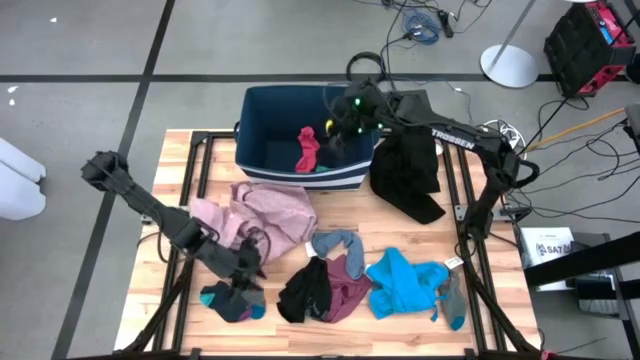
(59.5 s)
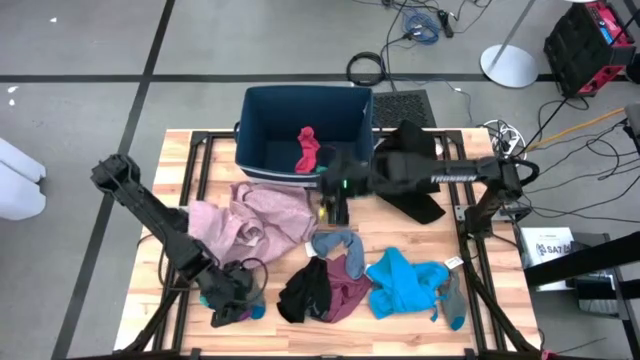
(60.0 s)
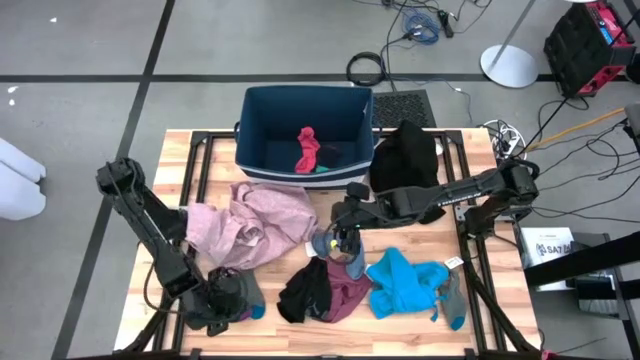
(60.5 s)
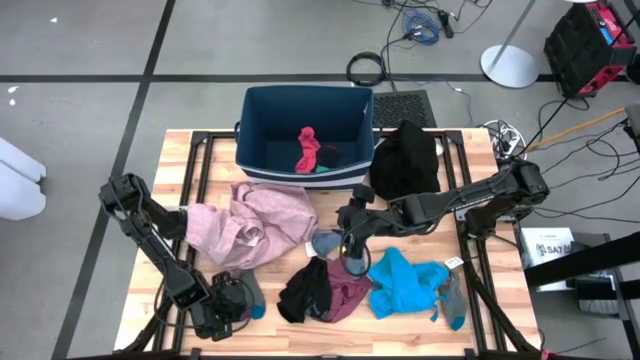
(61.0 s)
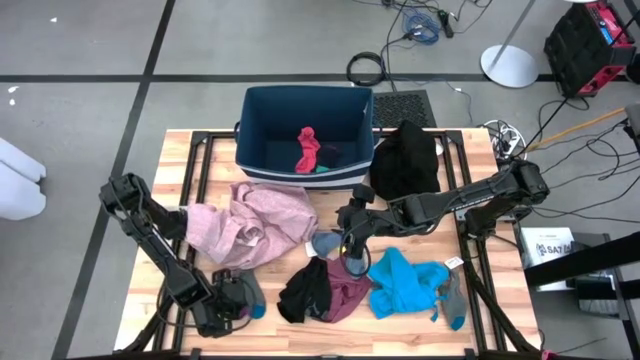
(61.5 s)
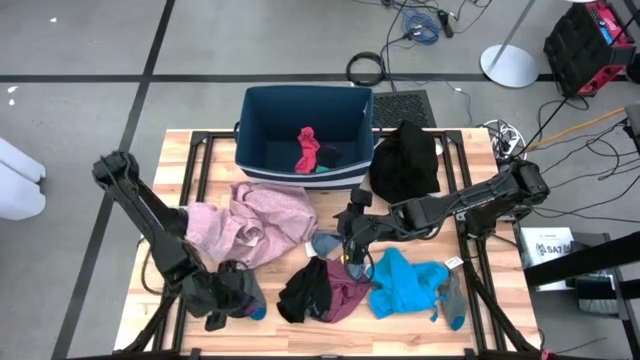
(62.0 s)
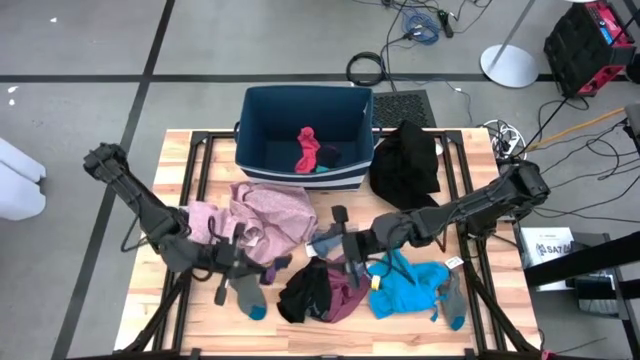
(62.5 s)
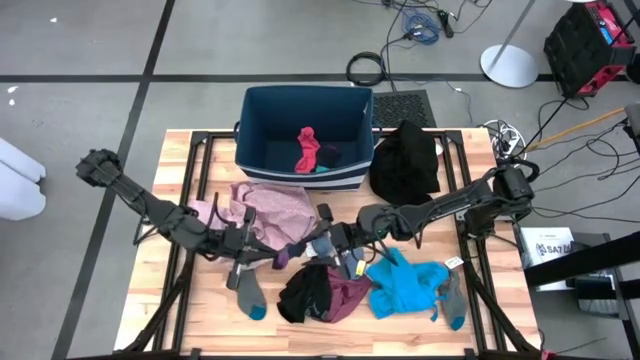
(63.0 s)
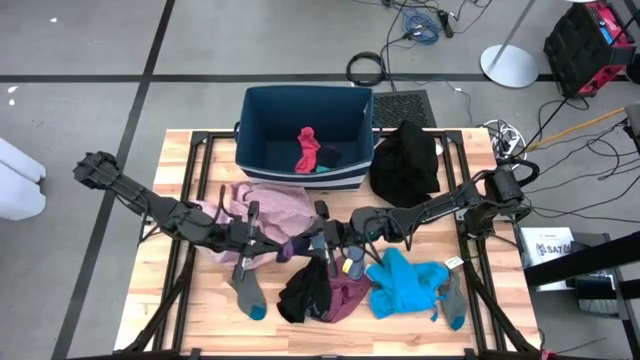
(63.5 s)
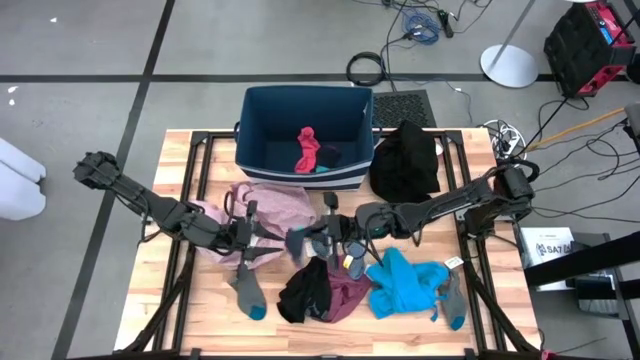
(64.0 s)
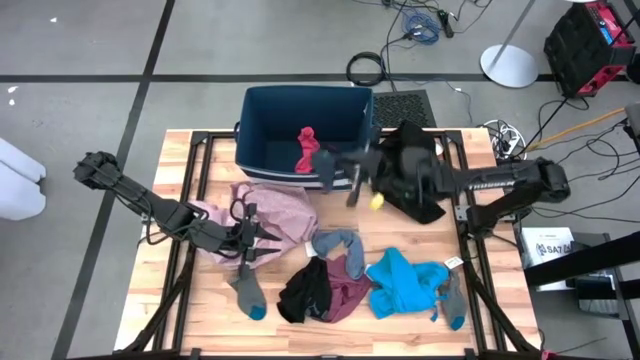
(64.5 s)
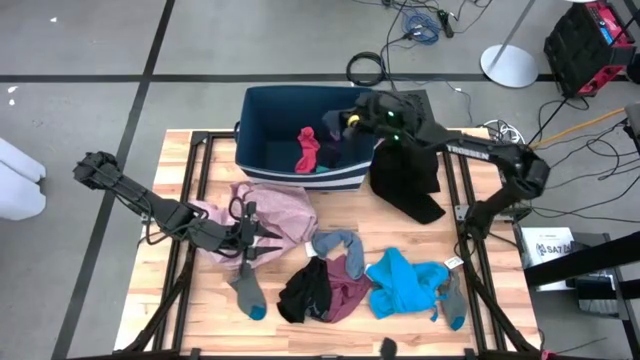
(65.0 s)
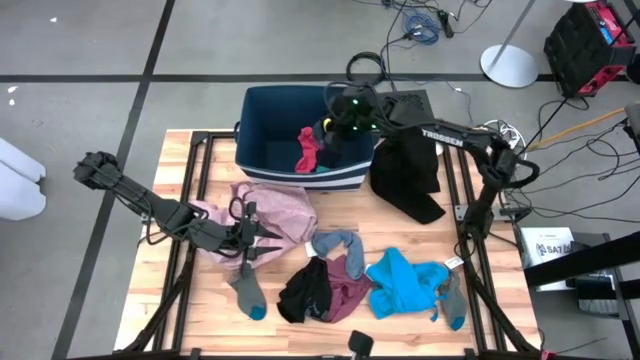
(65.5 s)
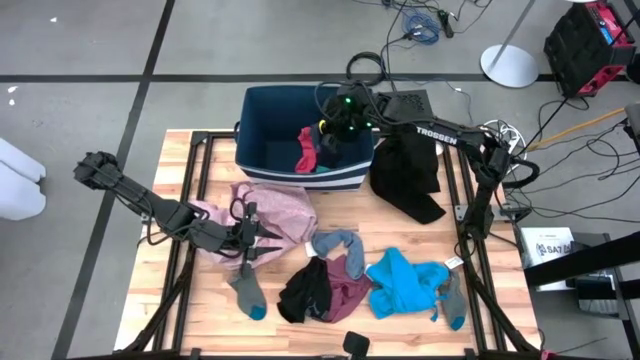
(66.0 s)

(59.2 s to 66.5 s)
Task: Sort clothes
Put the dark blue sock into the blue laundry organizer

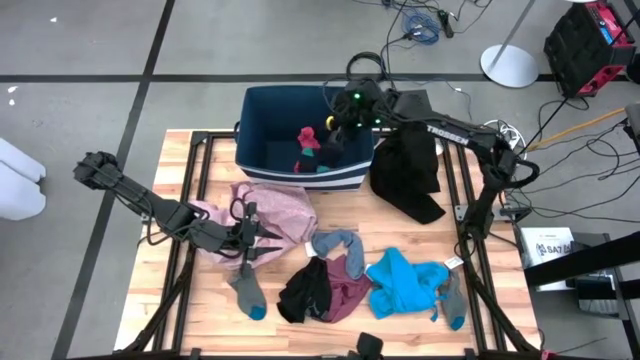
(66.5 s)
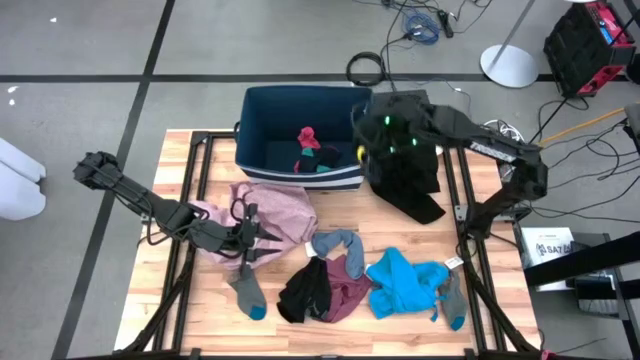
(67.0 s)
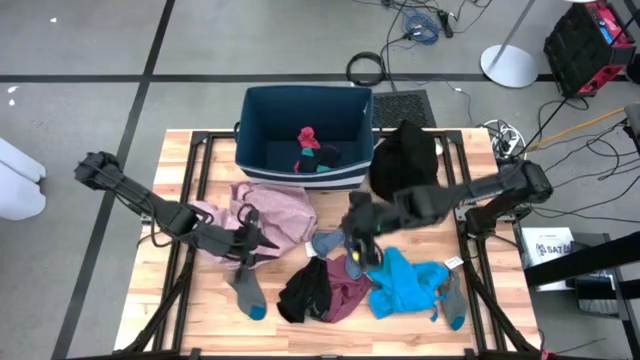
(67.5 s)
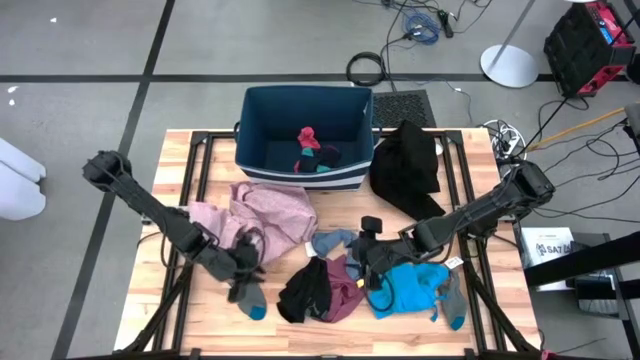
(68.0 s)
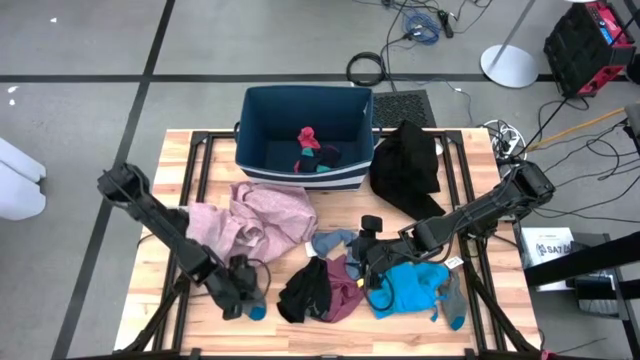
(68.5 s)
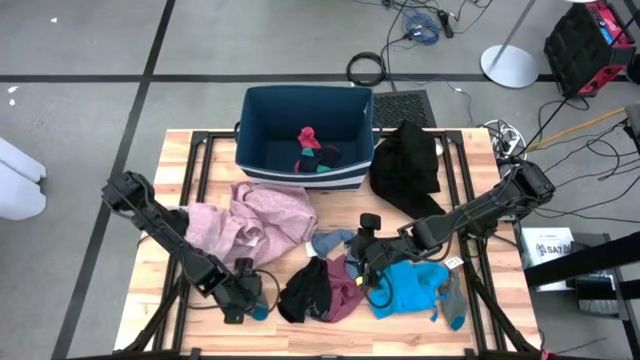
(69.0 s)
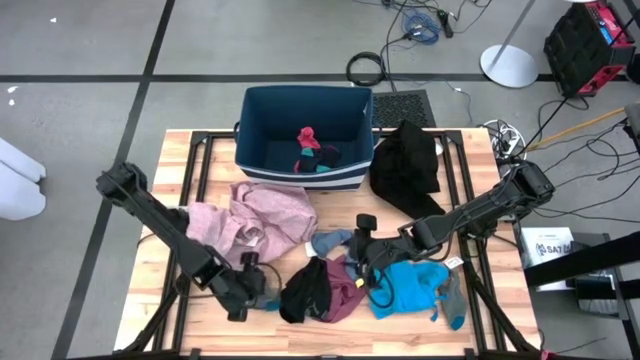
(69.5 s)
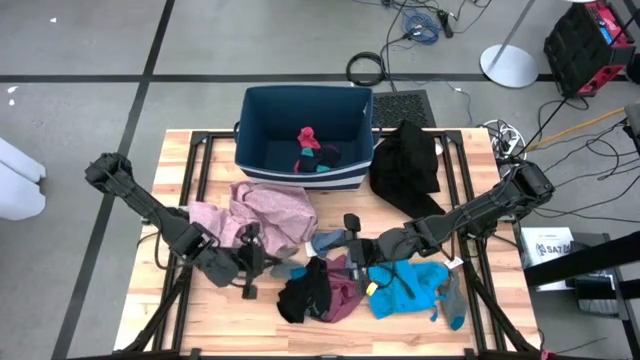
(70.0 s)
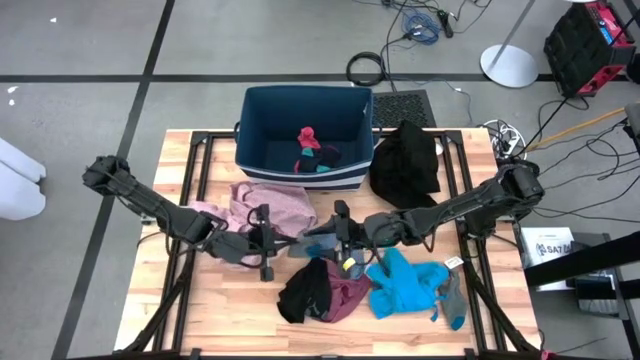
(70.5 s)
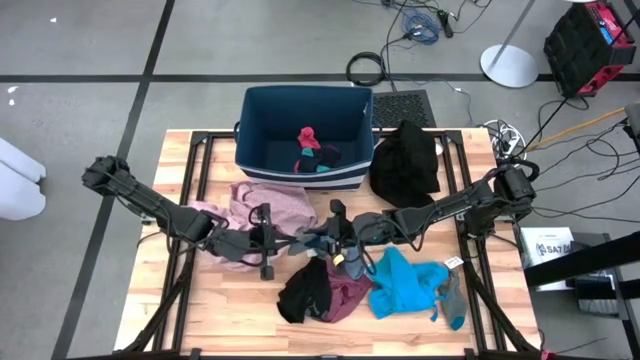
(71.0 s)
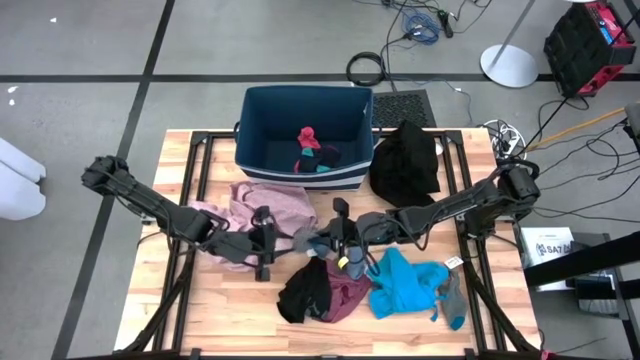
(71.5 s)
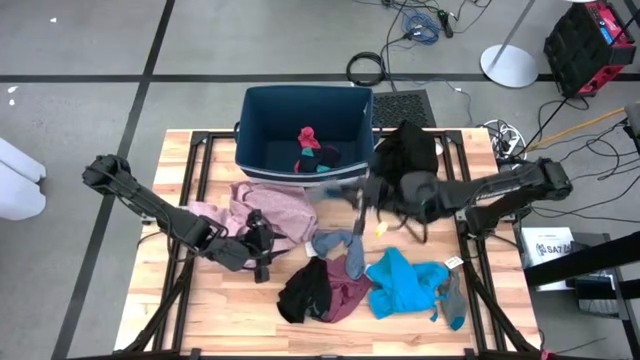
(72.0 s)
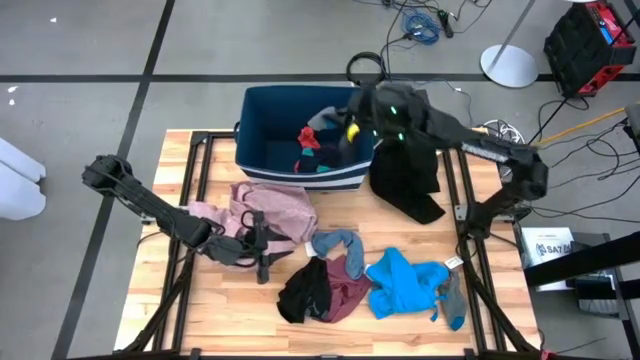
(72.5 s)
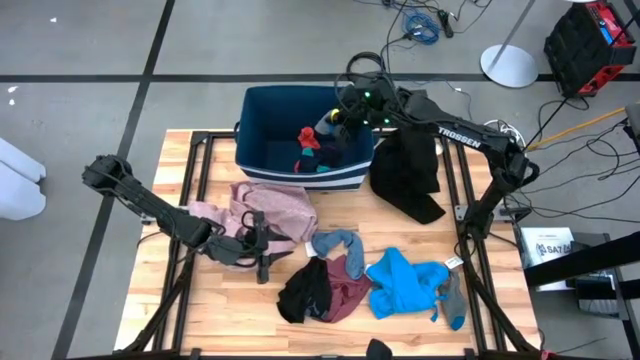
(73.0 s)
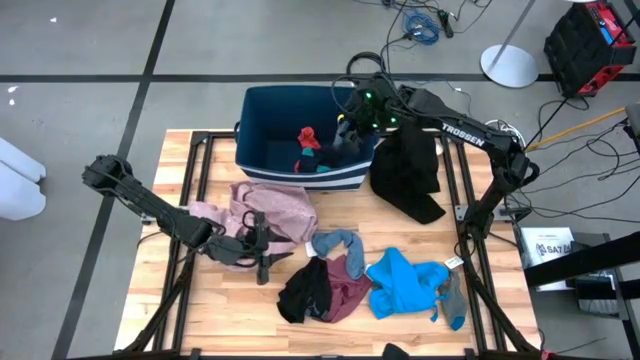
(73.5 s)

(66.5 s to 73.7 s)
Put the gray sock into the blue laundry organizer

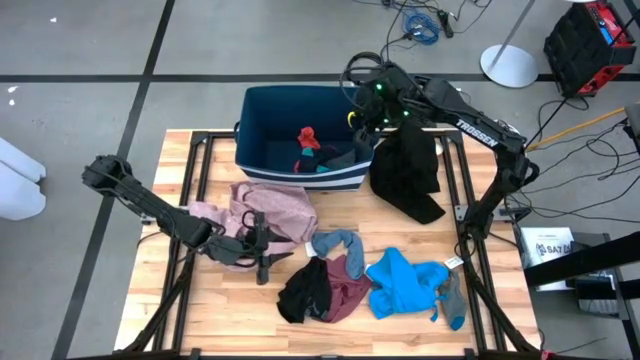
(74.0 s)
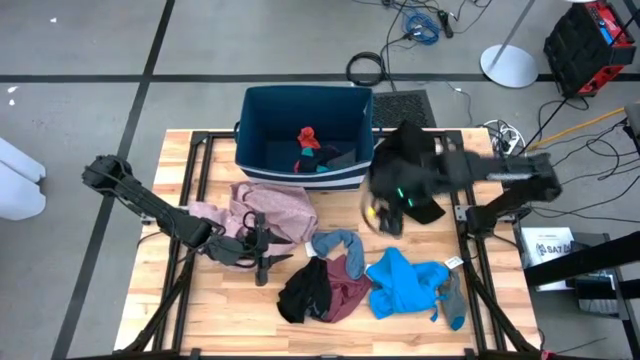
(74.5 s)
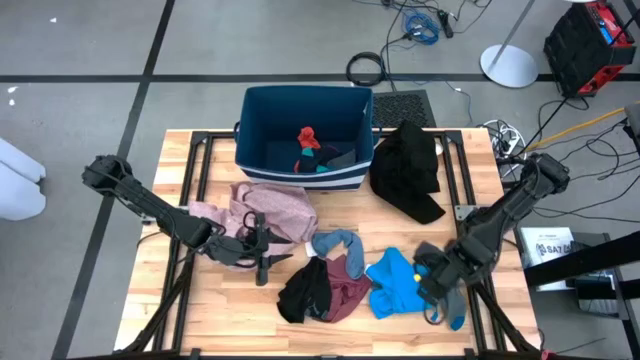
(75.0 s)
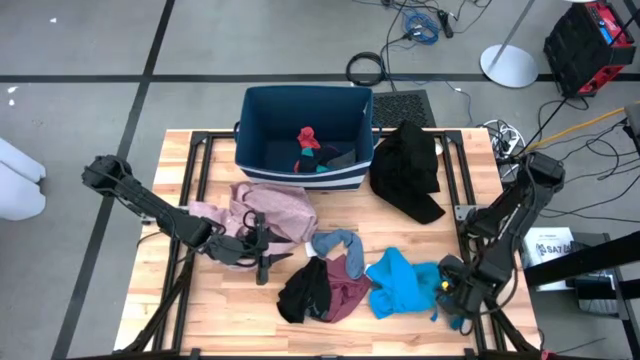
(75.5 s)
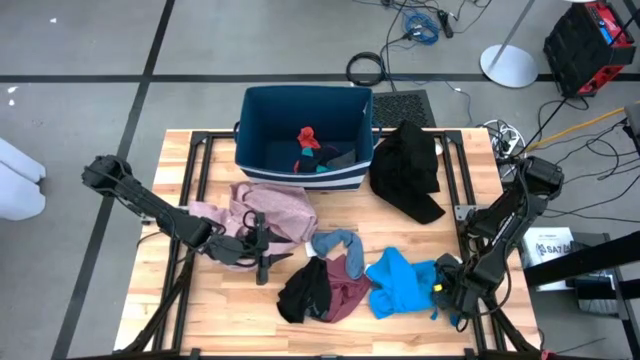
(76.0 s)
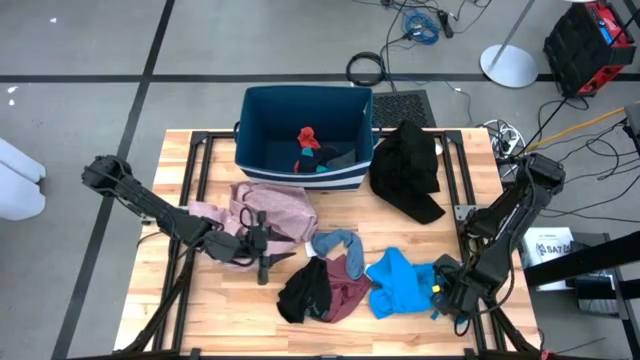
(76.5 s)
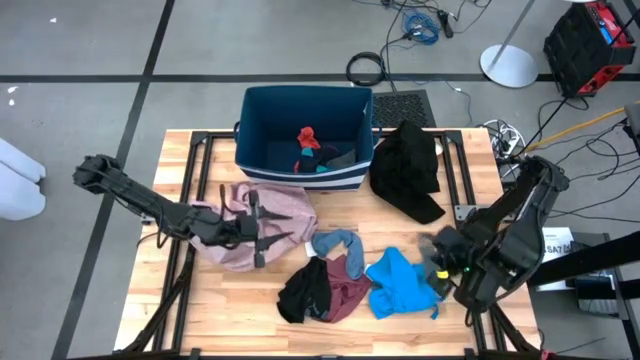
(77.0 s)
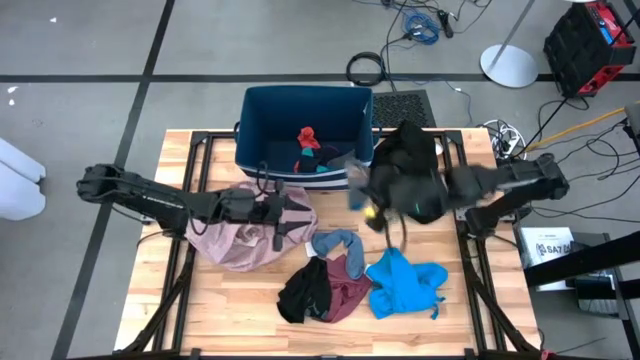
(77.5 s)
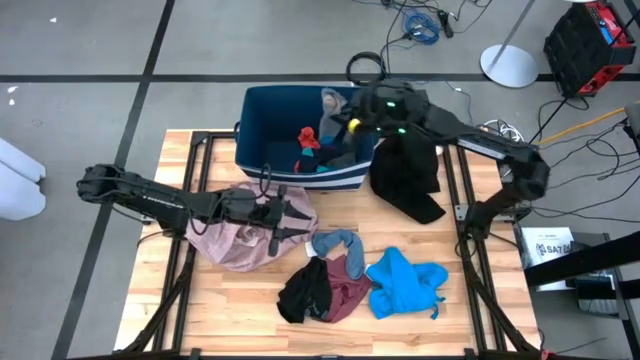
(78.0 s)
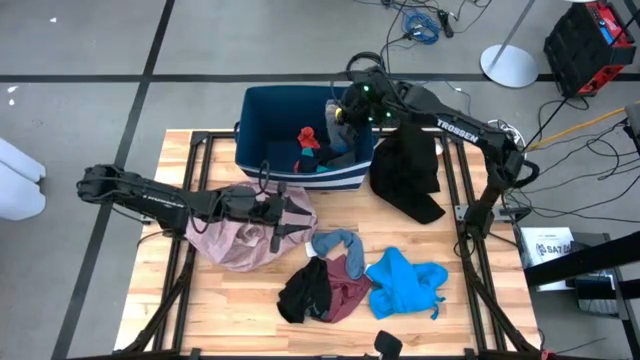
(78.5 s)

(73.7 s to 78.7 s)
Put the gray sock into the blue laundry organizer

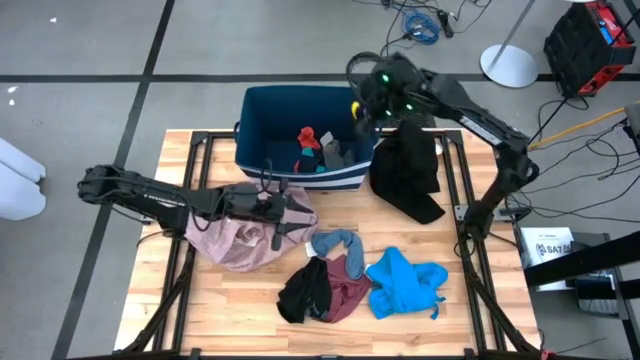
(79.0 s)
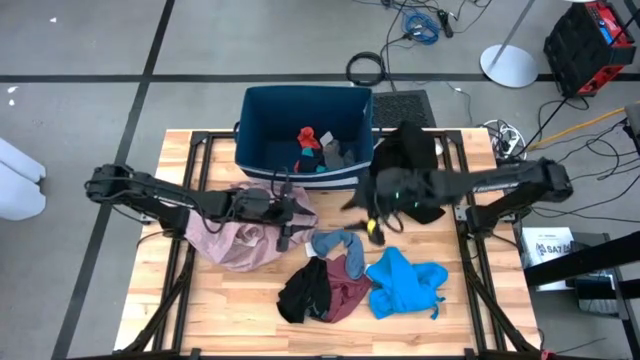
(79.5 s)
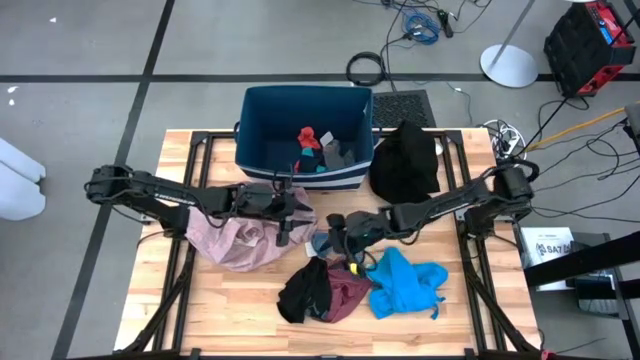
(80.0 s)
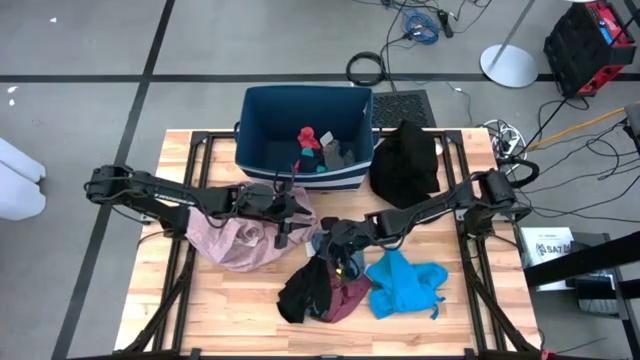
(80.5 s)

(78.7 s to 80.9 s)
Move the black boxer to the top right of the table
